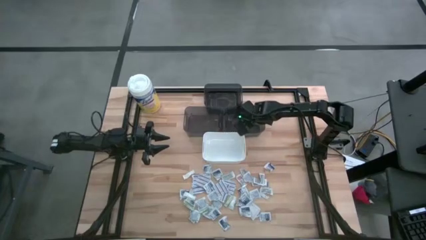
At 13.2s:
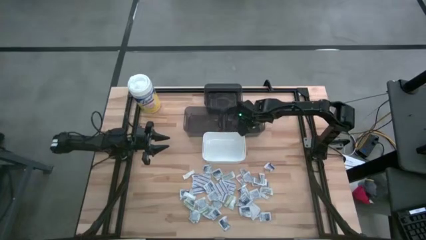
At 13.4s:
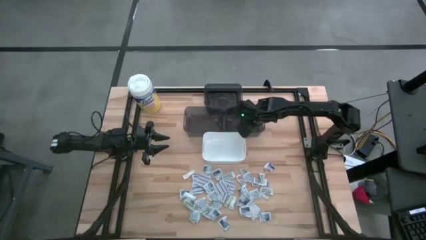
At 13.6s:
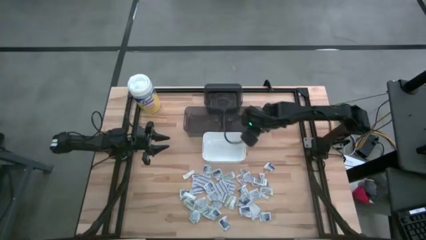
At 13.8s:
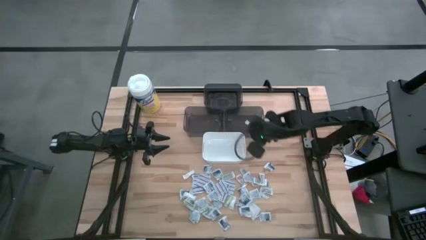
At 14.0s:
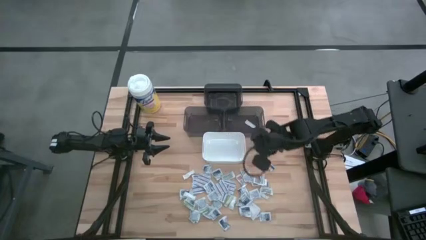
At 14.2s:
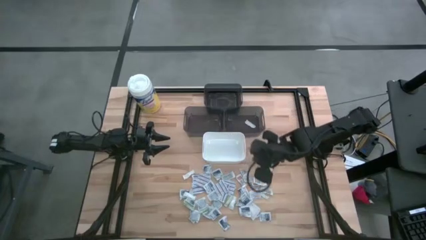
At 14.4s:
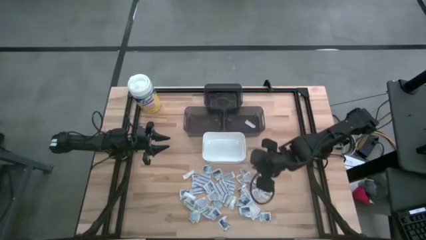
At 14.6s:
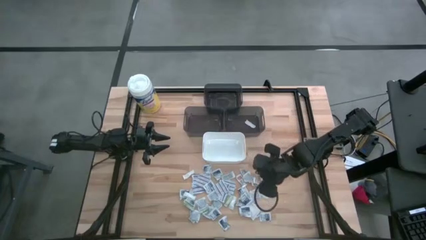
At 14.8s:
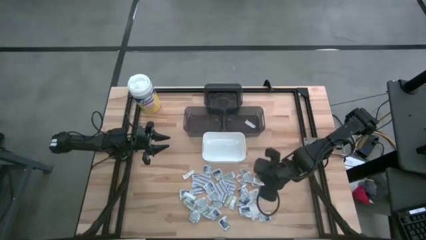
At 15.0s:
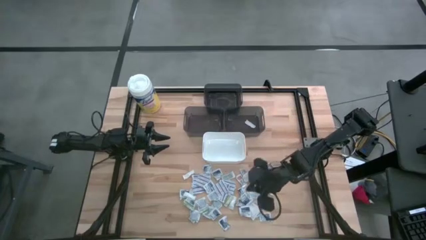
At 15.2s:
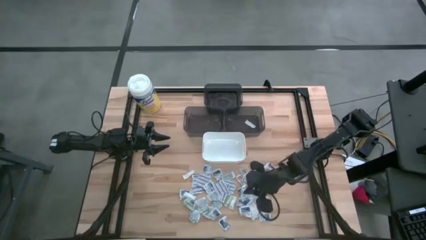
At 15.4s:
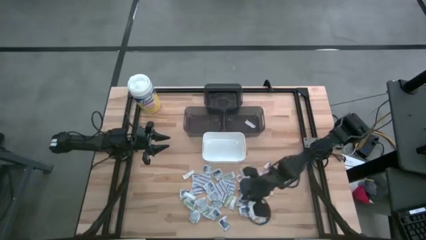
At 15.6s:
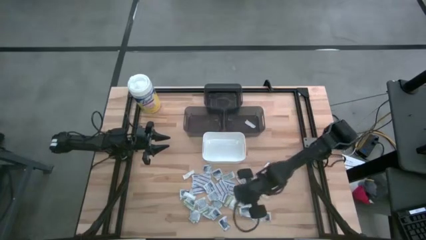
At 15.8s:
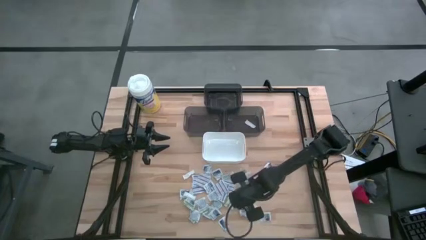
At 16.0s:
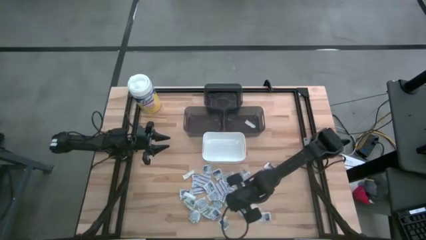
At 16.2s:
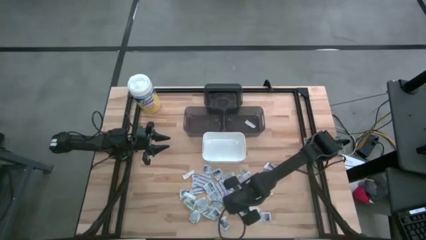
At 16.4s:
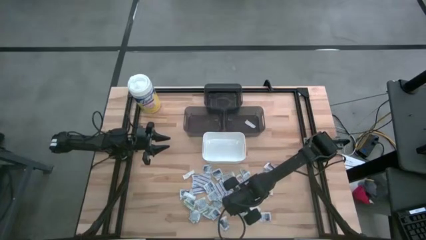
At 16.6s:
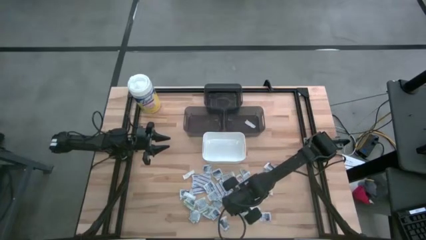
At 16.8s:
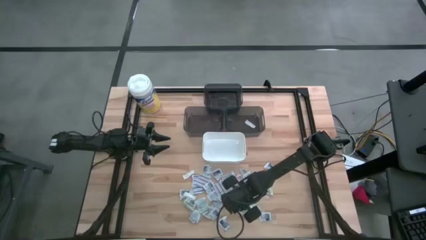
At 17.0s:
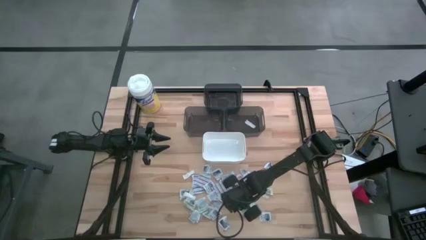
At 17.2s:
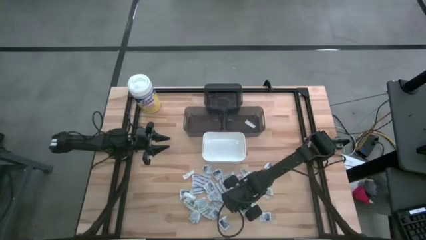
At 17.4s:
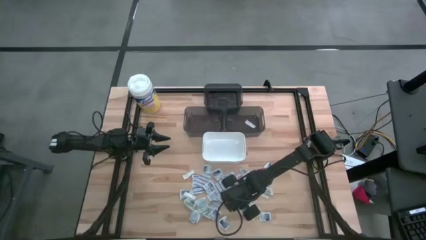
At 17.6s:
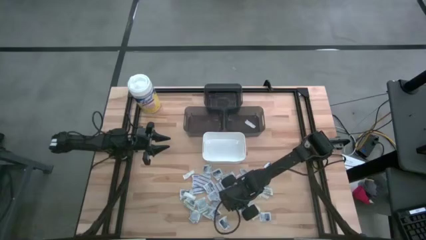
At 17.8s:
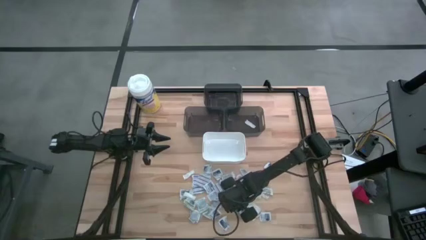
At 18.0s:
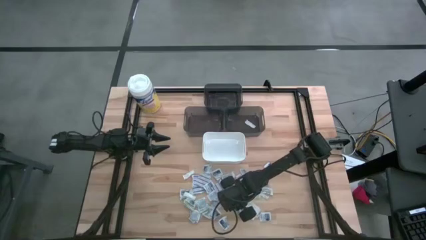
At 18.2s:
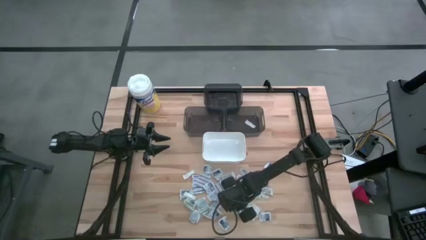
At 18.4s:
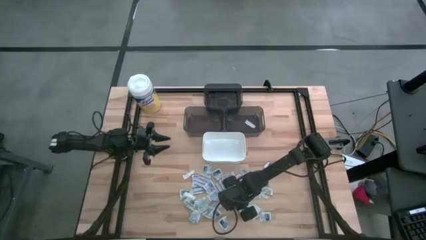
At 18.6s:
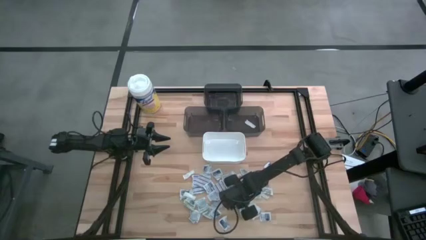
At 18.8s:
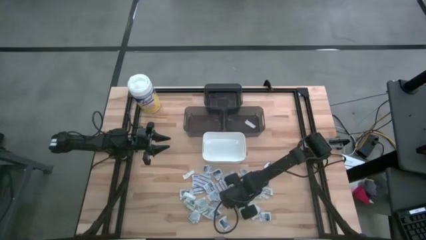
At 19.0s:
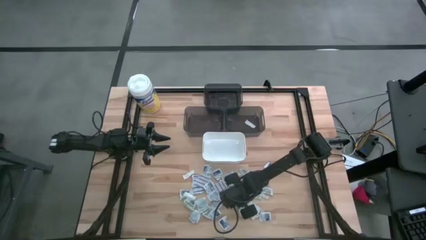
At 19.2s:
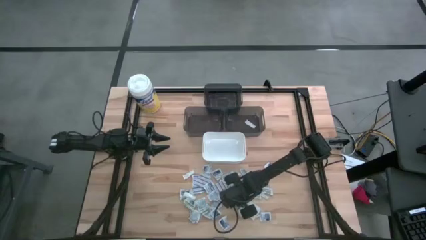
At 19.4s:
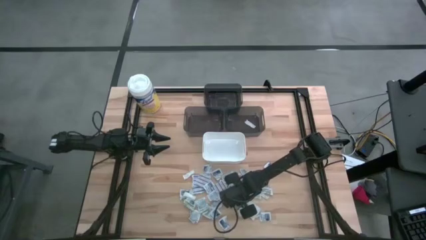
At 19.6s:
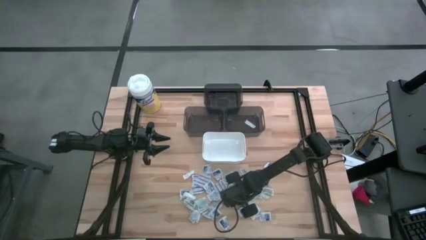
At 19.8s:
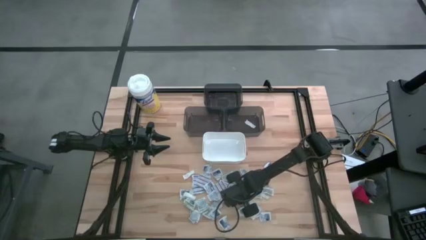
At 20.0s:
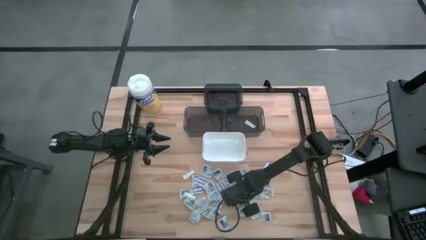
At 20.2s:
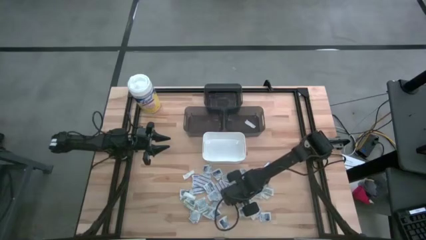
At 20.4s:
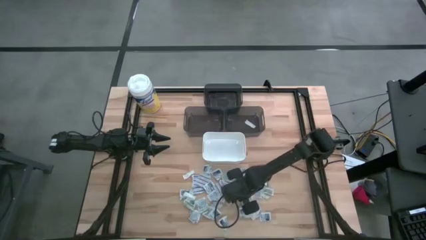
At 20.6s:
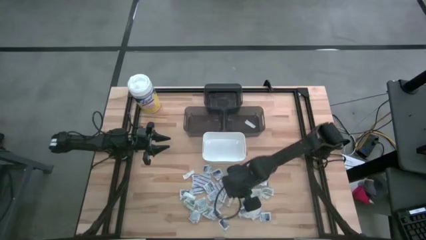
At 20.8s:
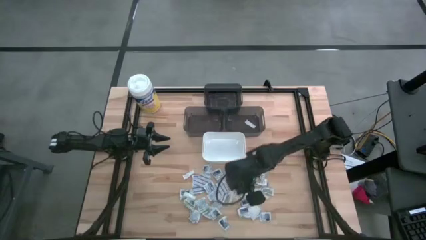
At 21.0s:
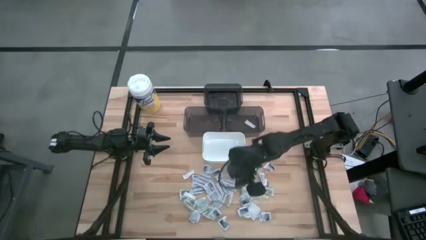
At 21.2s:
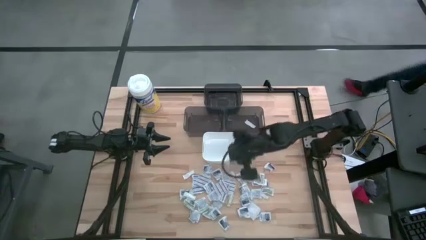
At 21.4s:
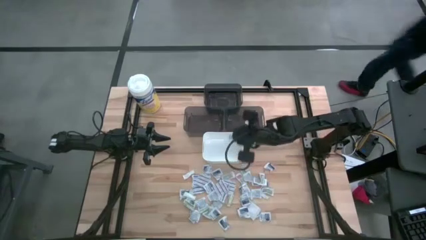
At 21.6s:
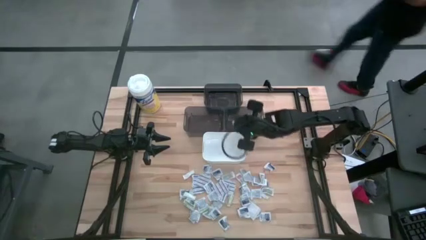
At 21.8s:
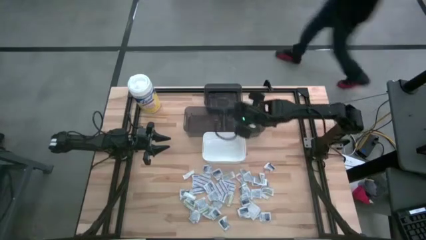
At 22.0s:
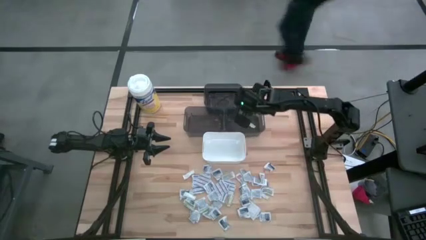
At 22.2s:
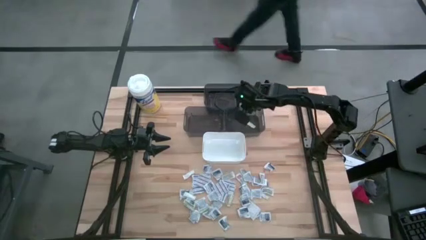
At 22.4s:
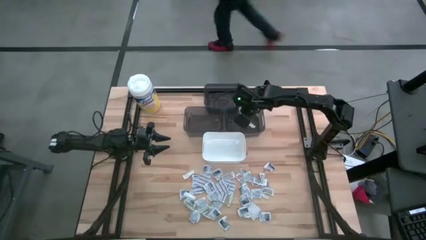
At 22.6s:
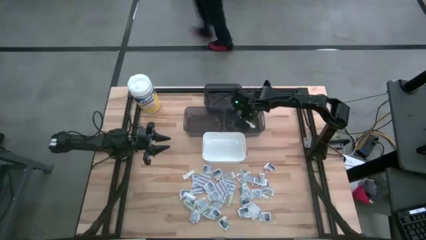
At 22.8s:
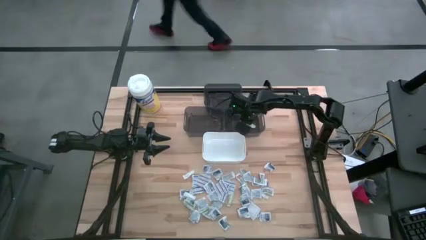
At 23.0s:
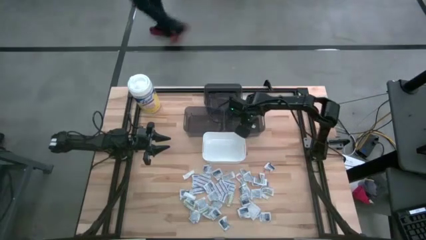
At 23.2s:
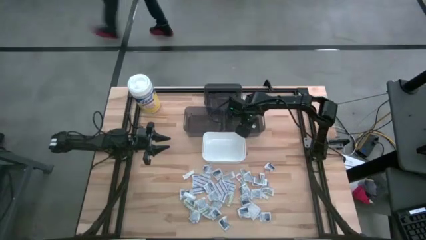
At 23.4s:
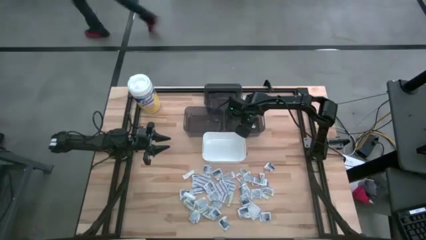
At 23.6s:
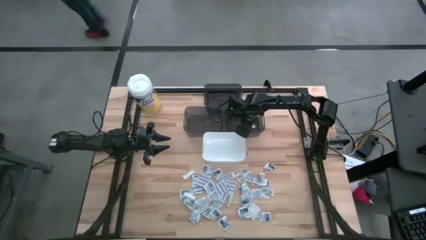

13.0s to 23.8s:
Task: Pick & Place First Aid Supplies
Put the green bandage into the bottom right black bin
